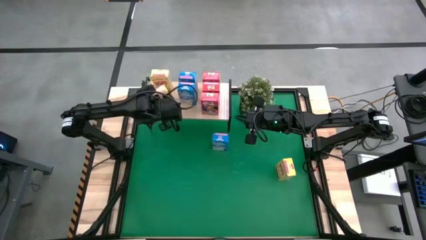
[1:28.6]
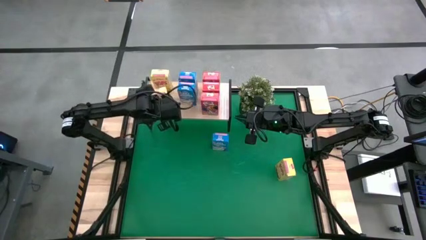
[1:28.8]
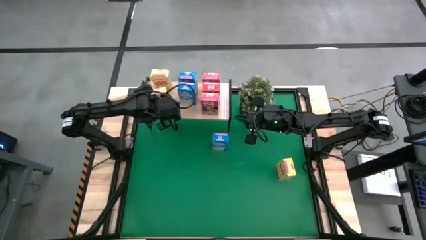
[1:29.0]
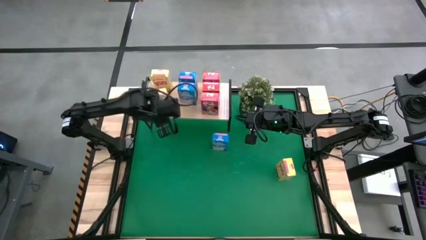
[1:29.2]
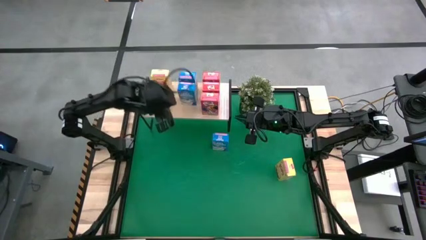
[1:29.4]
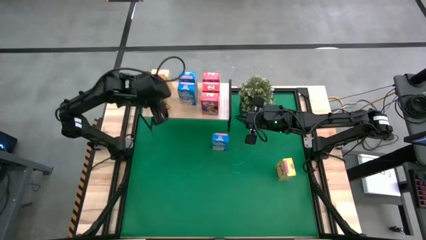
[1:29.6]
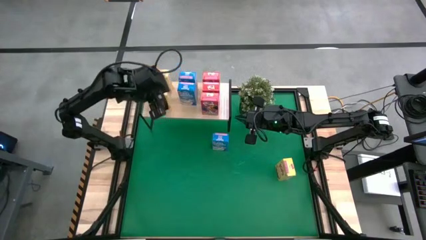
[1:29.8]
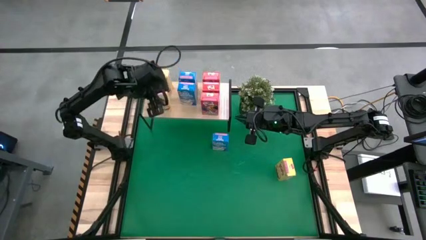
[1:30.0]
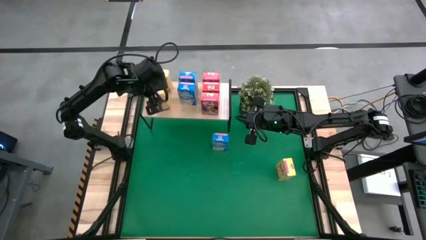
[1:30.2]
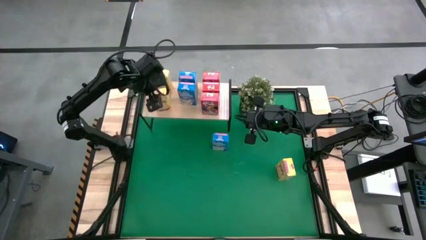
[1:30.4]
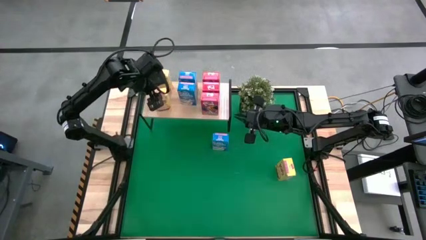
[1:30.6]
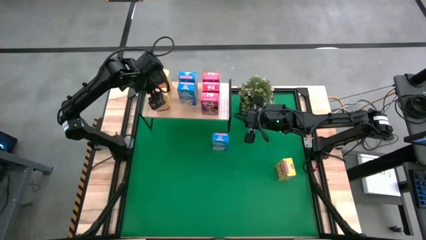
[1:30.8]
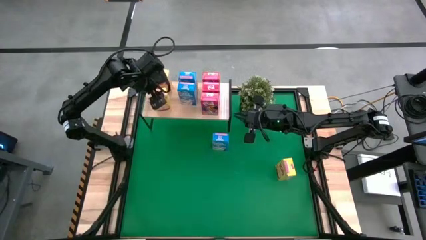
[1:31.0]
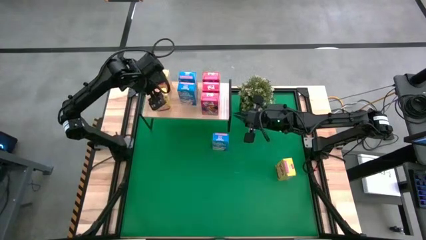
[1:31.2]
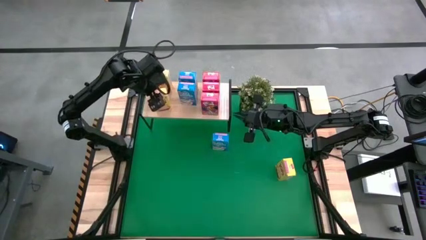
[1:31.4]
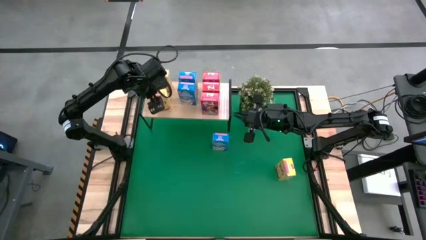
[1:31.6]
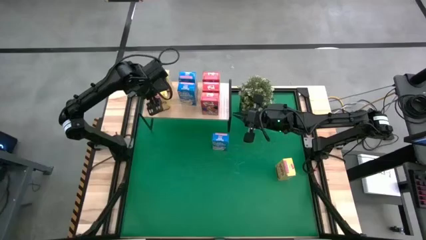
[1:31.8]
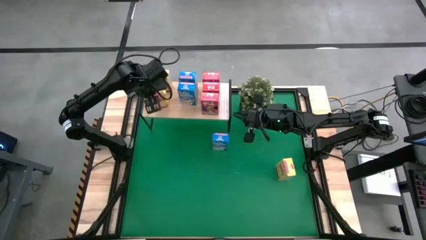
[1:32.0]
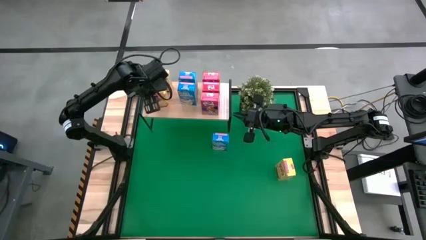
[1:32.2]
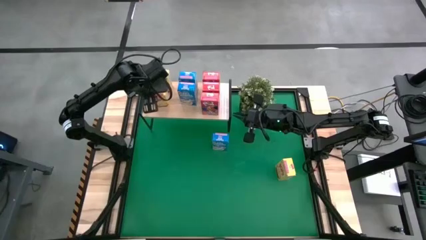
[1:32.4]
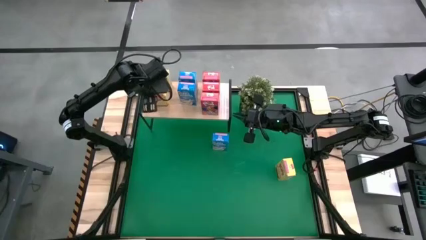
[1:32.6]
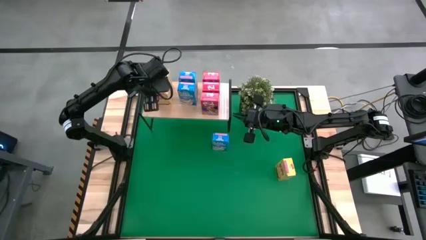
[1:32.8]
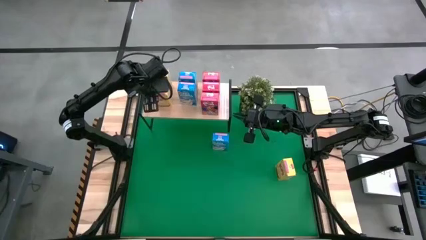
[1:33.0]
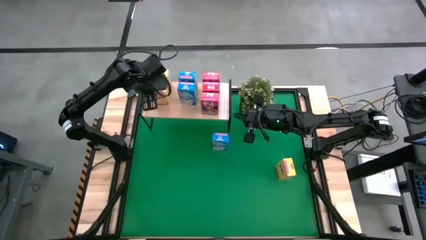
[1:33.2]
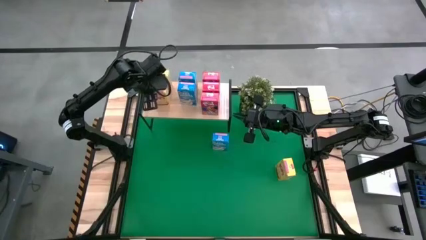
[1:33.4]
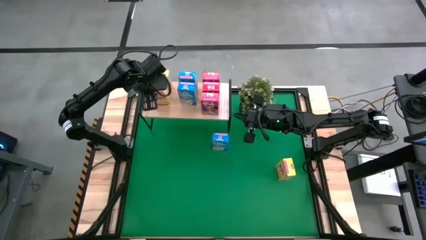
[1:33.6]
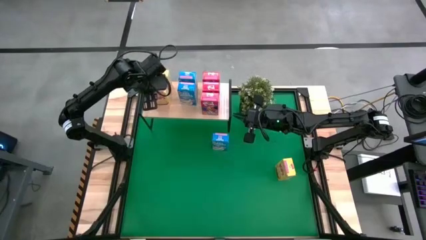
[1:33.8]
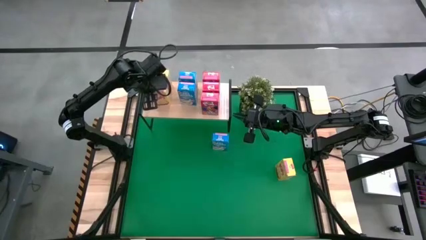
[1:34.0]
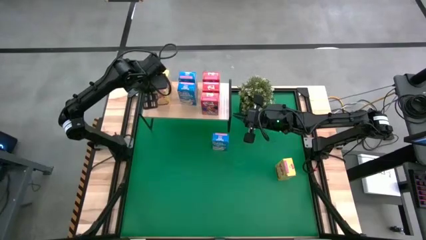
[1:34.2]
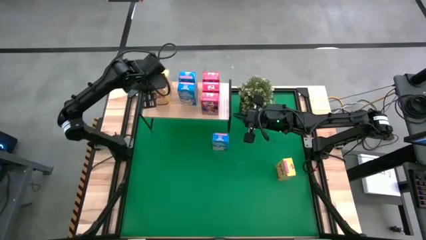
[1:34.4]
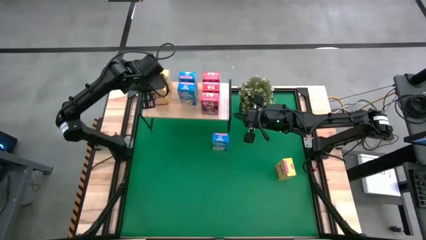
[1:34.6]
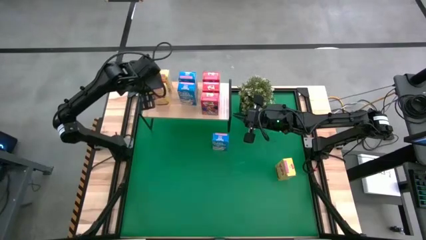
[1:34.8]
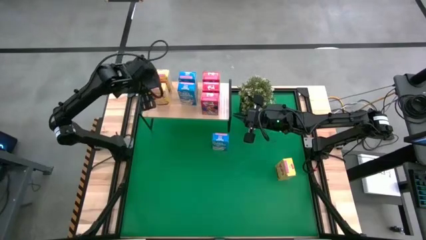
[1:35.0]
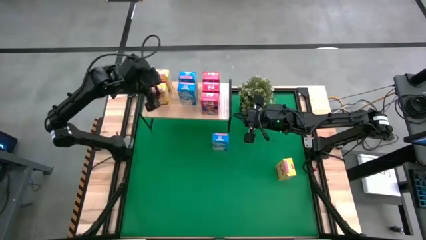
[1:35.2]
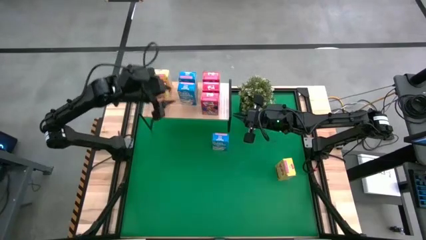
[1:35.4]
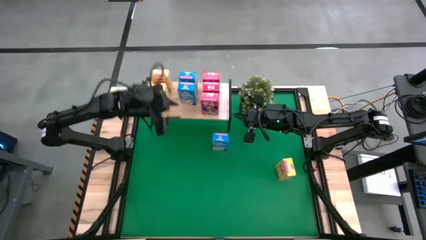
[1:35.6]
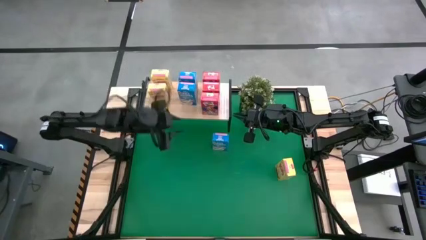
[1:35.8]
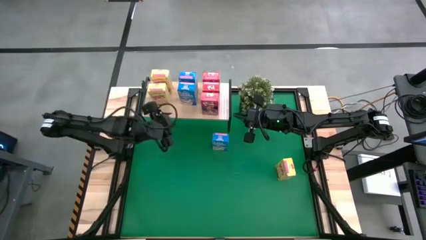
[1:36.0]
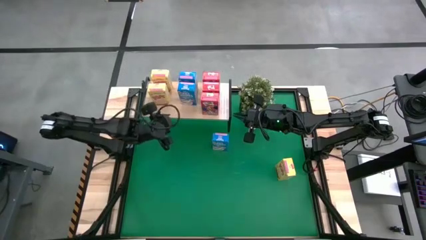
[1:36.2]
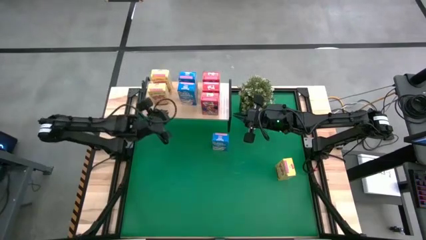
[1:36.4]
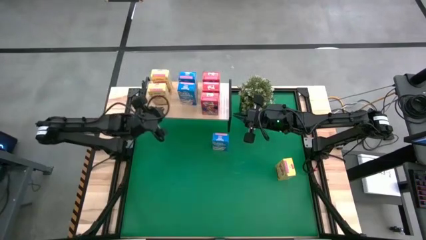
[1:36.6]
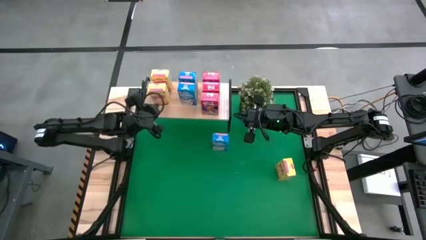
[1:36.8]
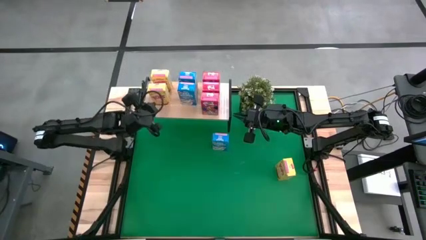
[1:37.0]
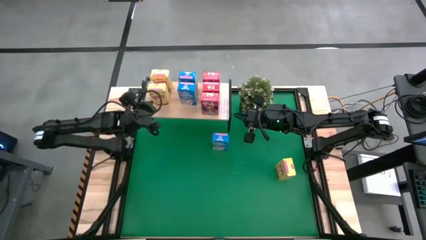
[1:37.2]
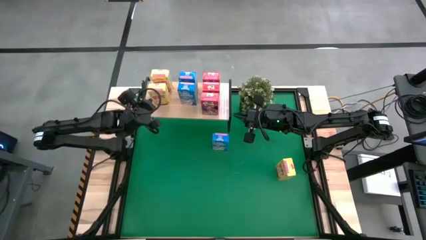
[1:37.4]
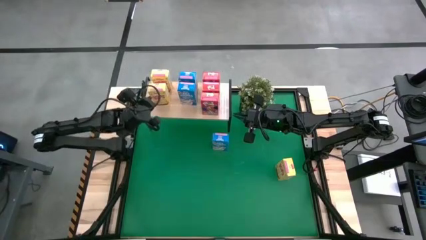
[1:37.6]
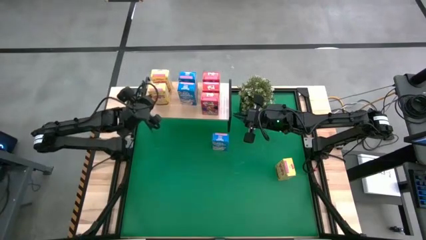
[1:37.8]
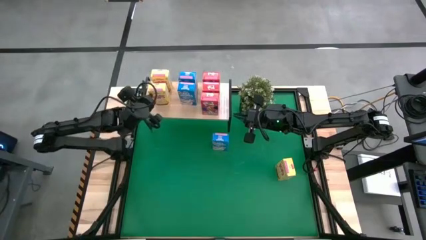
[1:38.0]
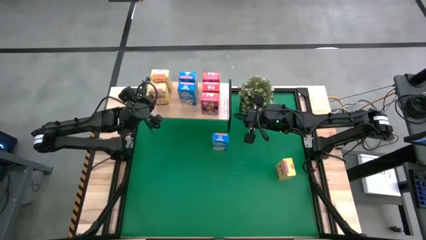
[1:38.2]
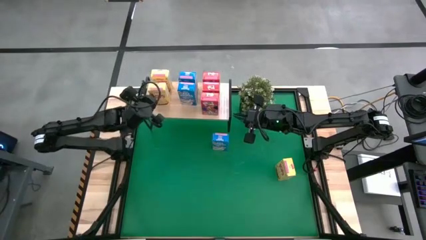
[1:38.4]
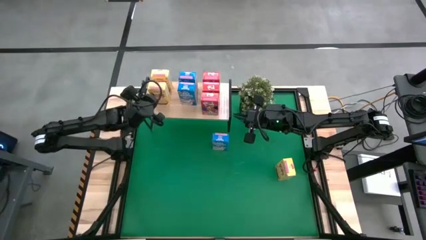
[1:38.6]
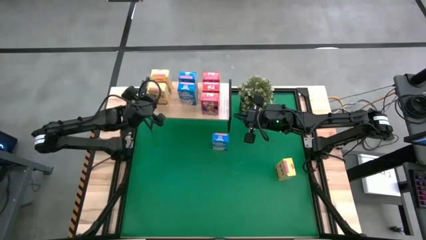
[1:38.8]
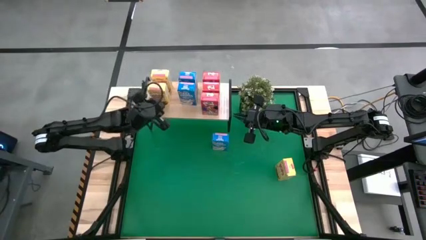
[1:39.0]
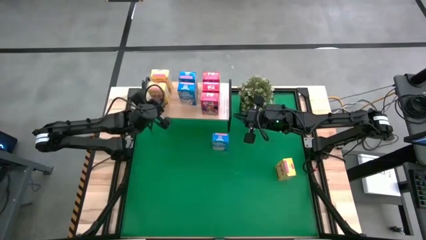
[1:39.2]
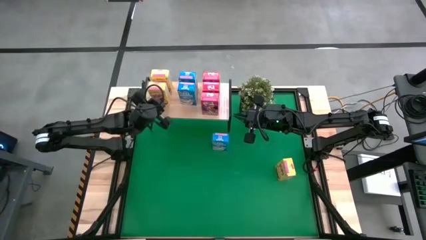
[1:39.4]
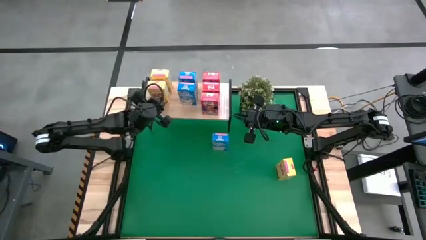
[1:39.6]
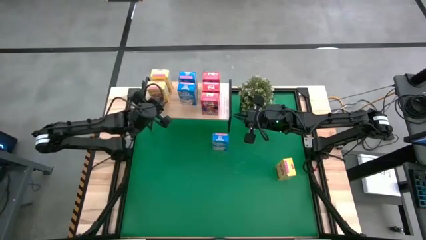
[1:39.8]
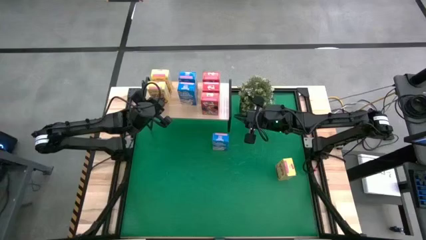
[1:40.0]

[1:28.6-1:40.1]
Task: Stack cereal on shelf
Put the left yellow cereal box on the shelf aligned with the other yellow cereal box

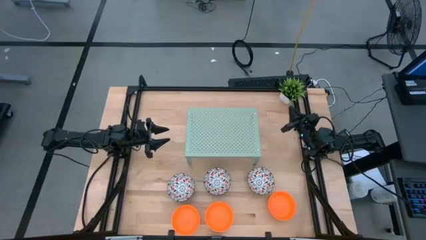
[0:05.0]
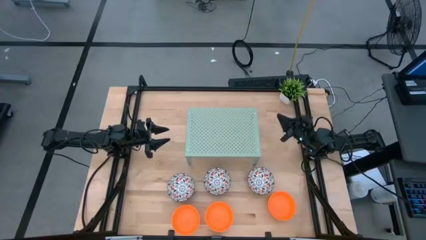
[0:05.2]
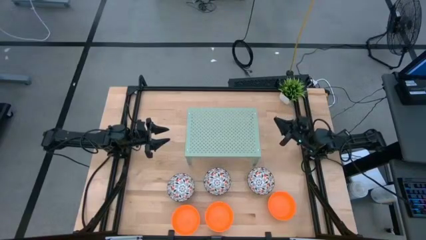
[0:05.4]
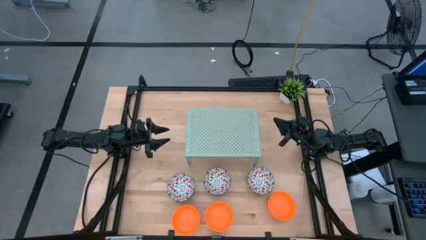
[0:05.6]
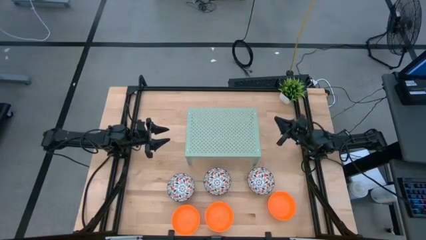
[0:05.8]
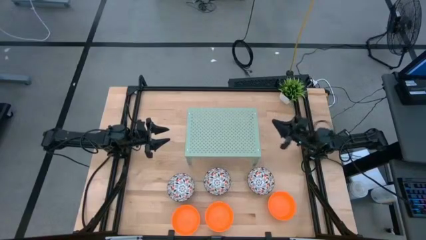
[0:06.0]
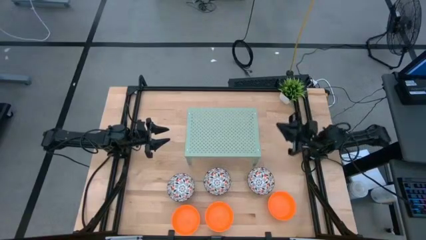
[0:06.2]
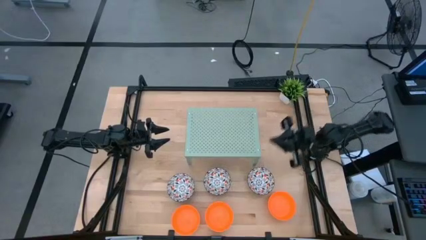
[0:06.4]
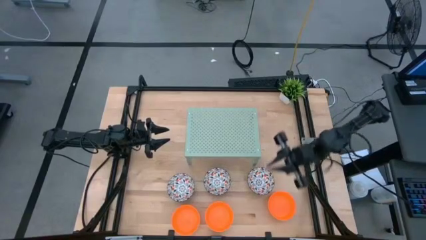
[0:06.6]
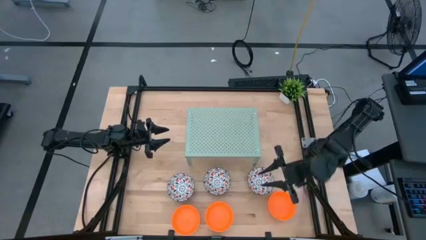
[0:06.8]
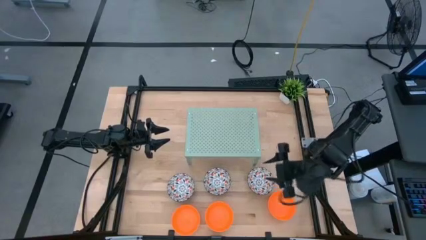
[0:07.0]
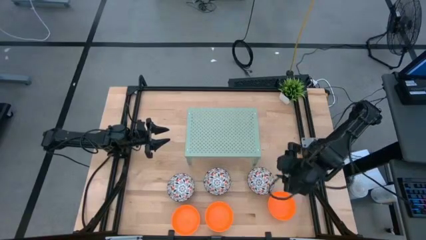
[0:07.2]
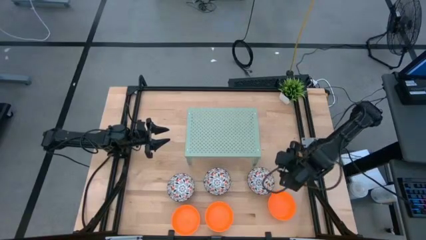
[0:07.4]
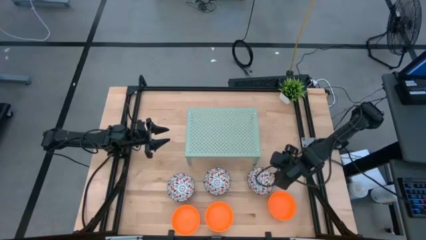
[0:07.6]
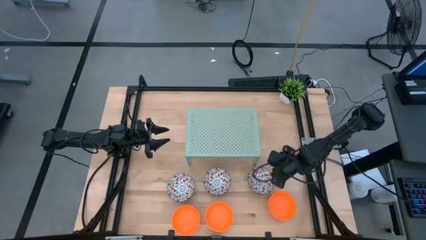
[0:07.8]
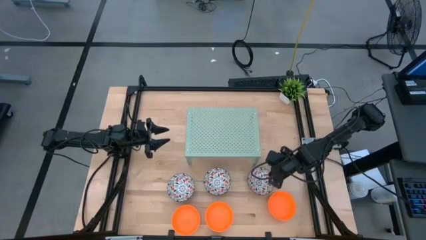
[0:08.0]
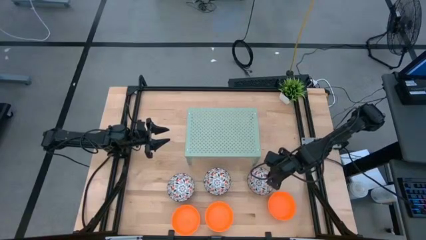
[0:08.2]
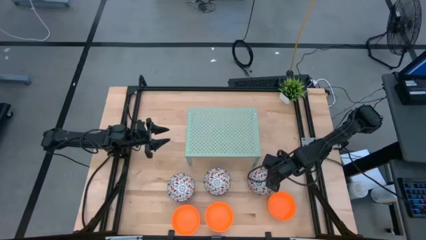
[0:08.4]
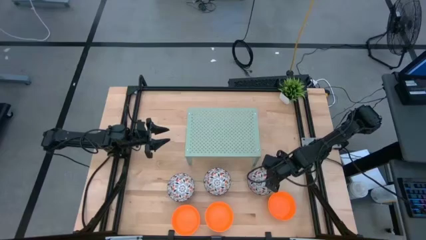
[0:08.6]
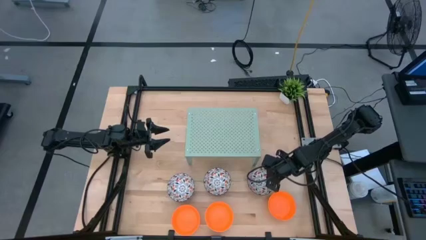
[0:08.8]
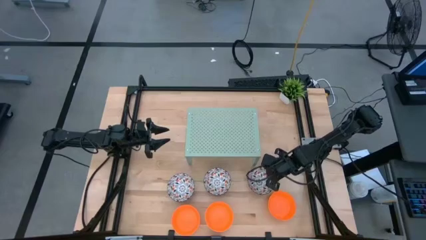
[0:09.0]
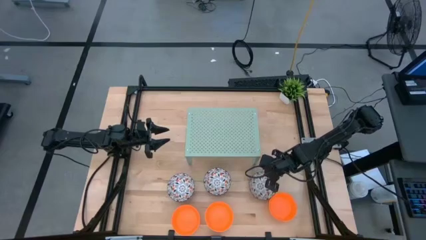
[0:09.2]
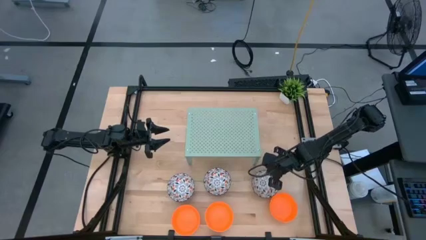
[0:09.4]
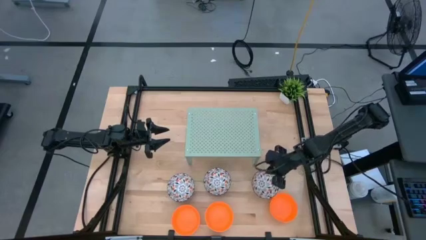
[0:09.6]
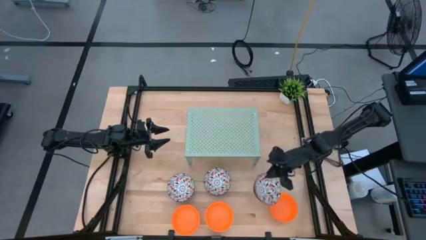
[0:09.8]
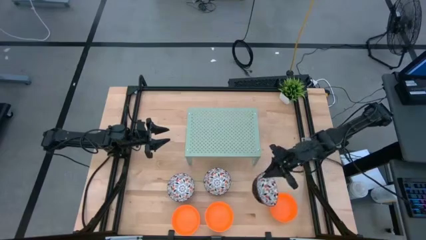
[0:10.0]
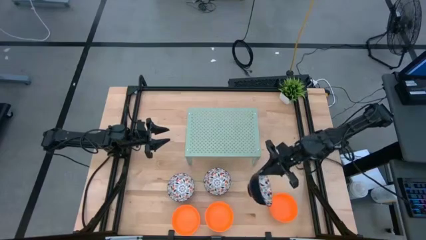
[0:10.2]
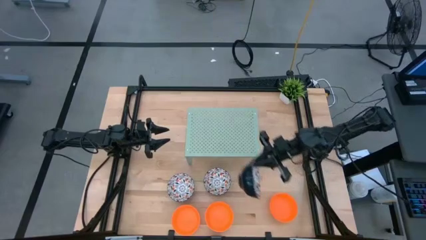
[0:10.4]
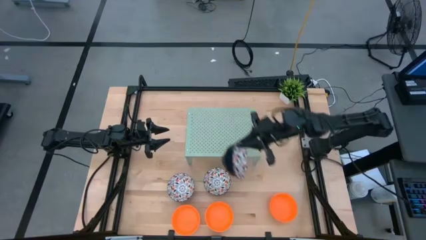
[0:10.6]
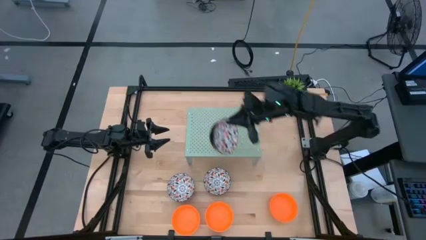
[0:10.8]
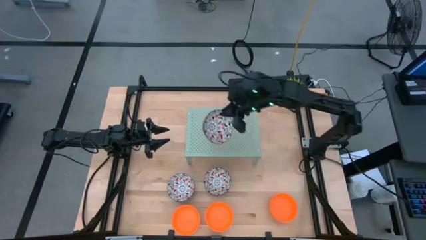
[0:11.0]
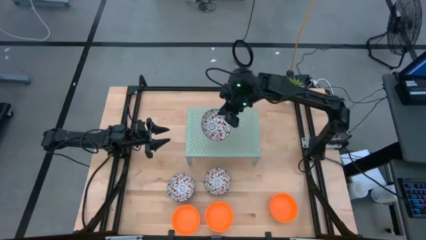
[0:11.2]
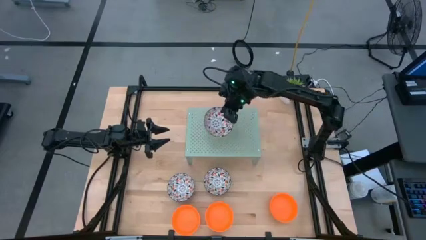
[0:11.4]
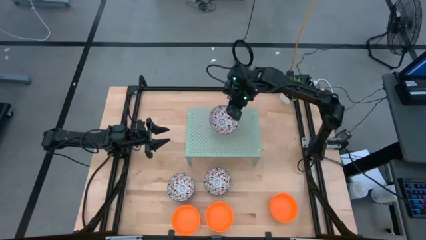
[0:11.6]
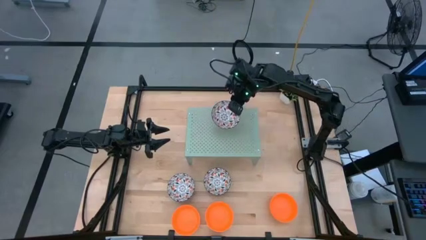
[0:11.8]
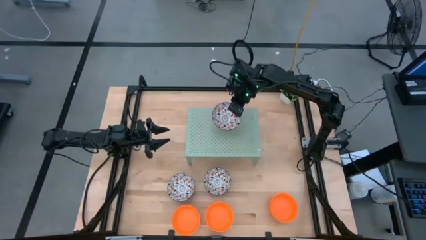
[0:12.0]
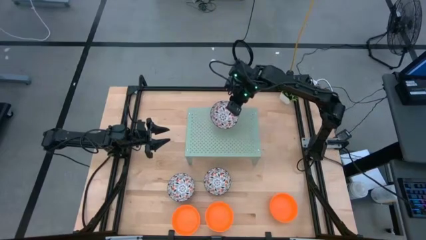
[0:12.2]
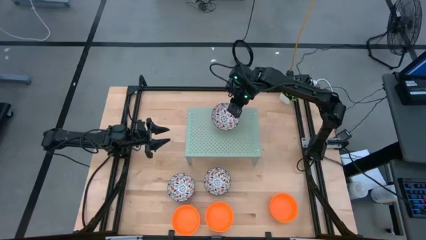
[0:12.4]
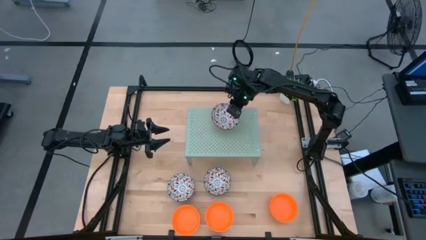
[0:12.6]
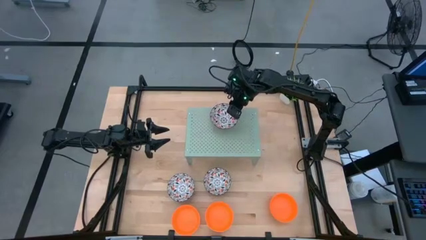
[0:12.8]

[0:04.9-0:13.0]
Task: Pick & Place Mini bowls
Put the right white patterned bowl on the shelf
